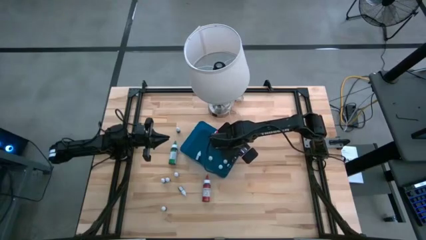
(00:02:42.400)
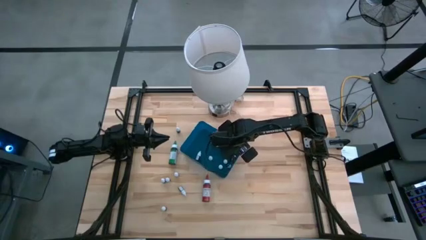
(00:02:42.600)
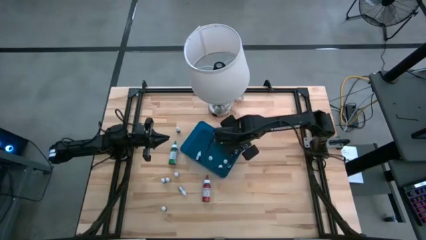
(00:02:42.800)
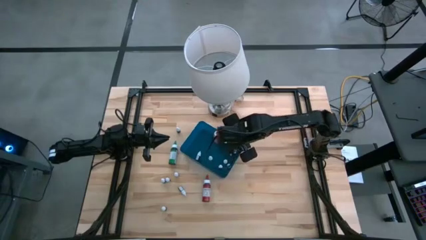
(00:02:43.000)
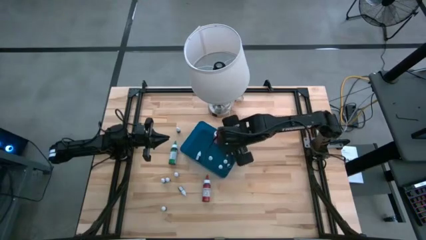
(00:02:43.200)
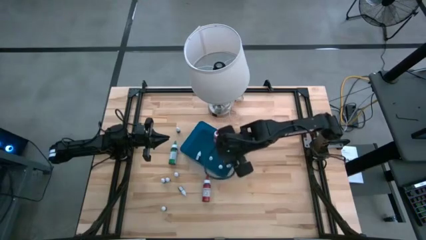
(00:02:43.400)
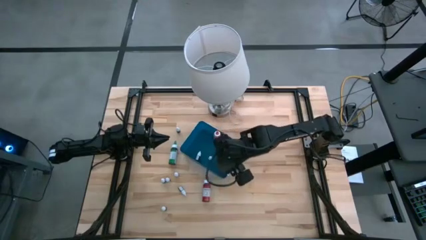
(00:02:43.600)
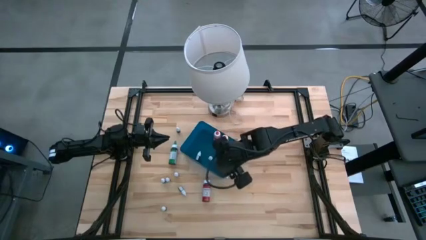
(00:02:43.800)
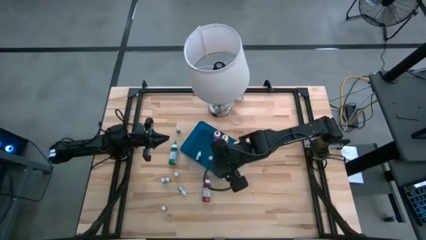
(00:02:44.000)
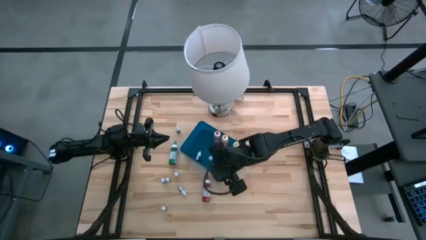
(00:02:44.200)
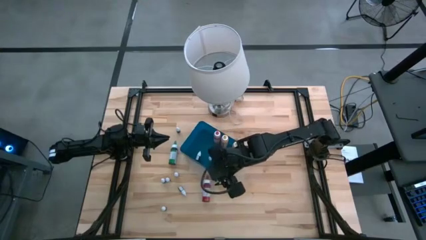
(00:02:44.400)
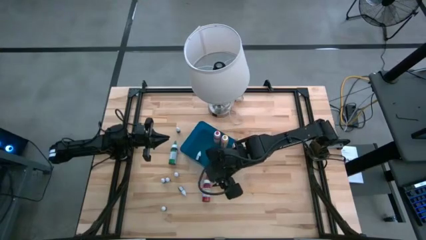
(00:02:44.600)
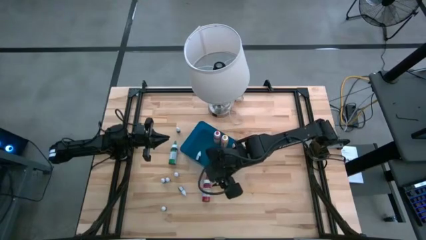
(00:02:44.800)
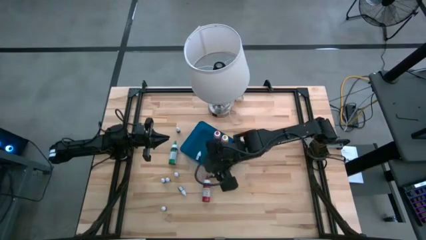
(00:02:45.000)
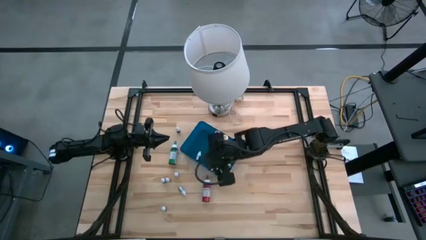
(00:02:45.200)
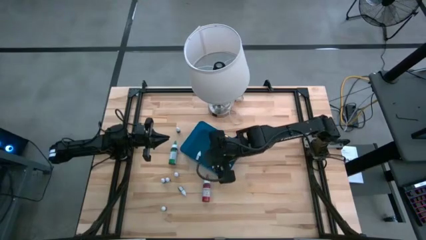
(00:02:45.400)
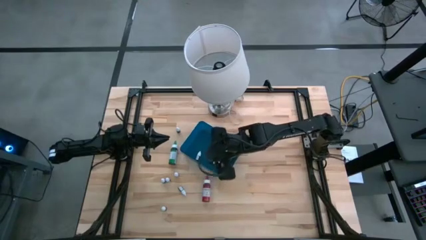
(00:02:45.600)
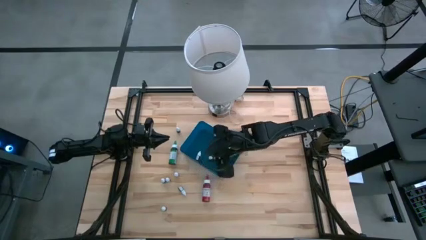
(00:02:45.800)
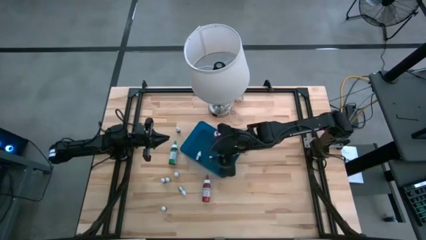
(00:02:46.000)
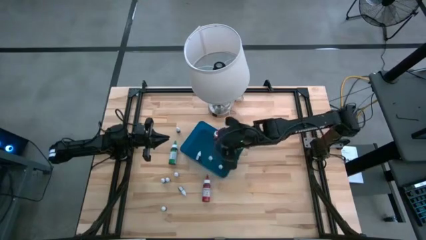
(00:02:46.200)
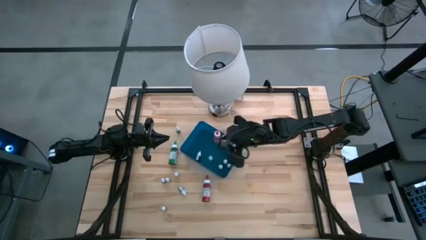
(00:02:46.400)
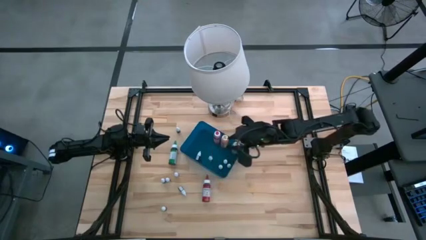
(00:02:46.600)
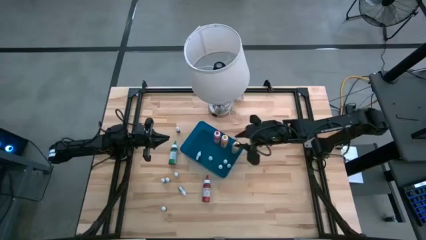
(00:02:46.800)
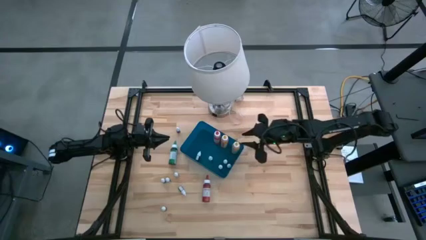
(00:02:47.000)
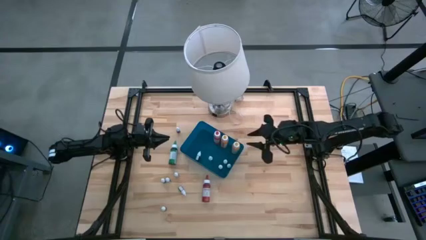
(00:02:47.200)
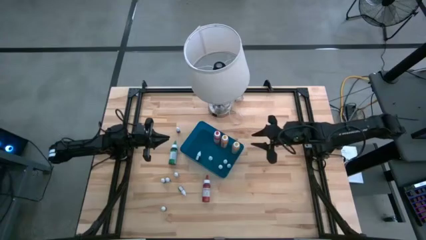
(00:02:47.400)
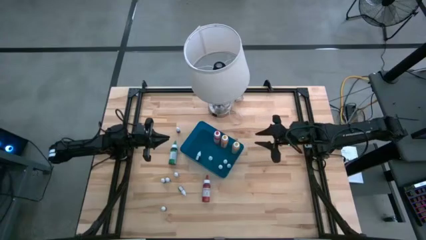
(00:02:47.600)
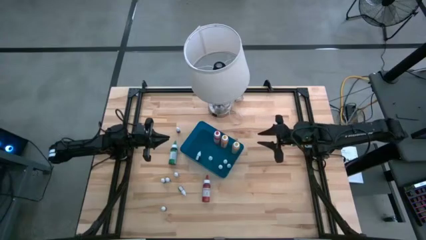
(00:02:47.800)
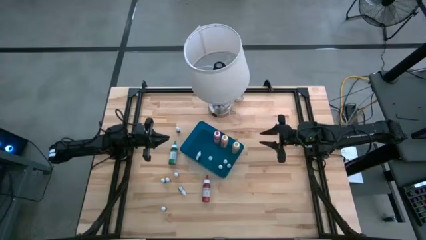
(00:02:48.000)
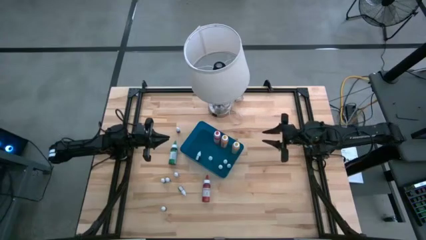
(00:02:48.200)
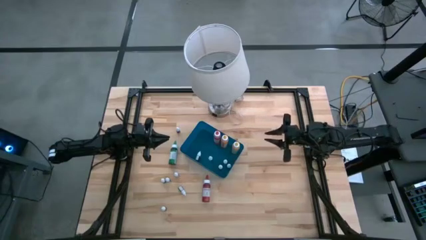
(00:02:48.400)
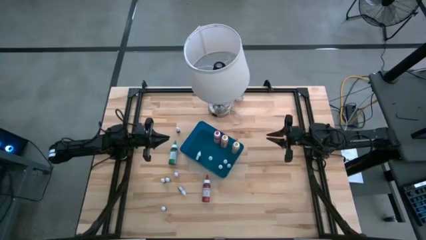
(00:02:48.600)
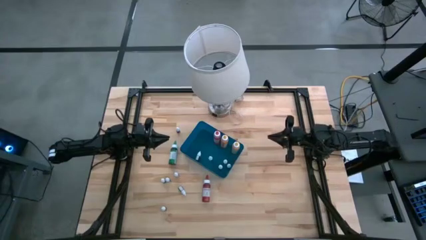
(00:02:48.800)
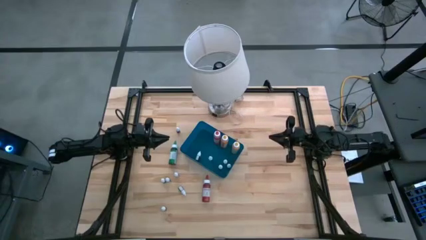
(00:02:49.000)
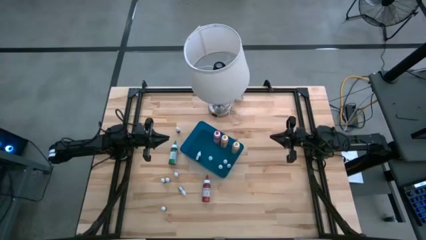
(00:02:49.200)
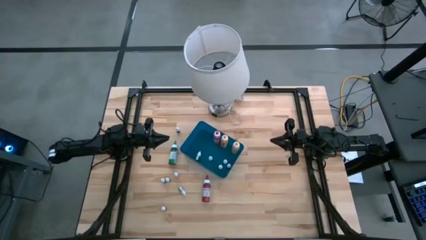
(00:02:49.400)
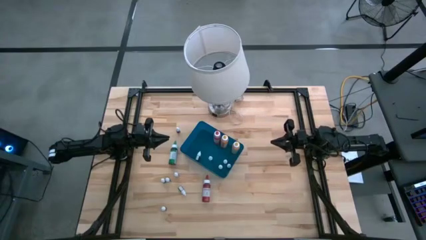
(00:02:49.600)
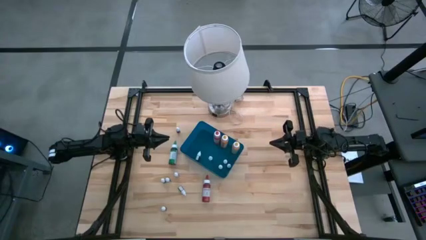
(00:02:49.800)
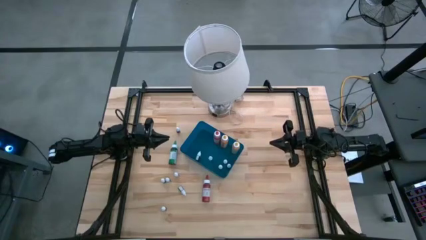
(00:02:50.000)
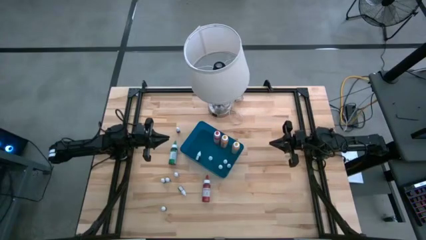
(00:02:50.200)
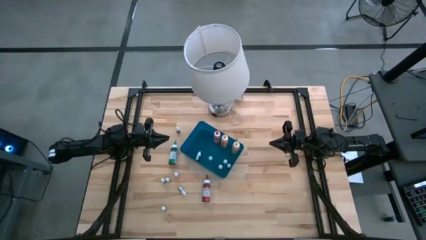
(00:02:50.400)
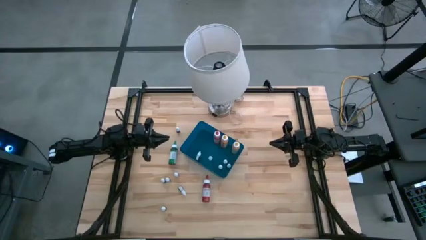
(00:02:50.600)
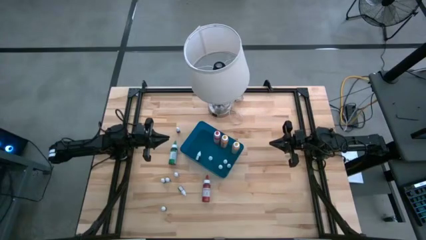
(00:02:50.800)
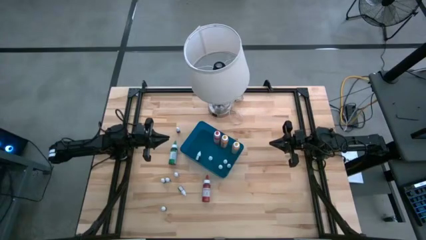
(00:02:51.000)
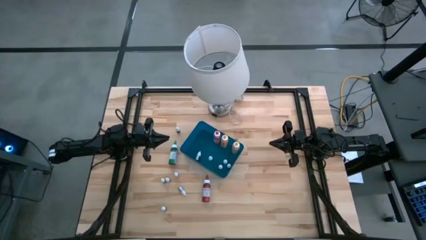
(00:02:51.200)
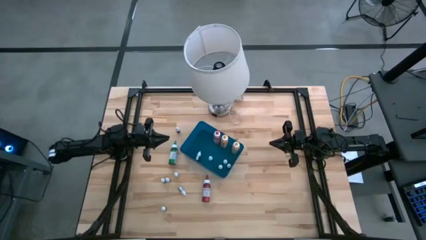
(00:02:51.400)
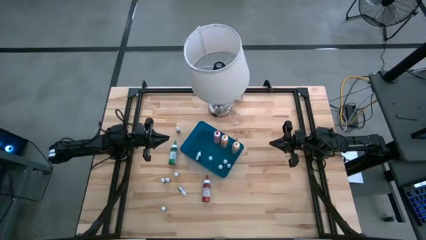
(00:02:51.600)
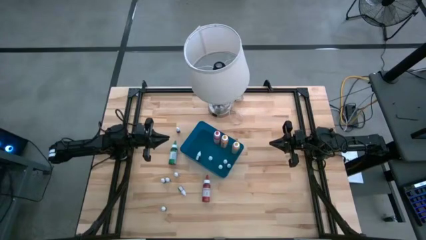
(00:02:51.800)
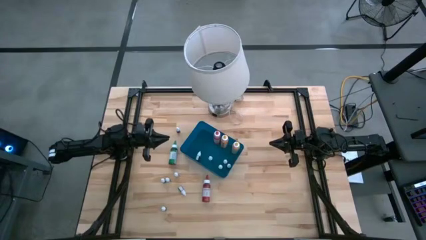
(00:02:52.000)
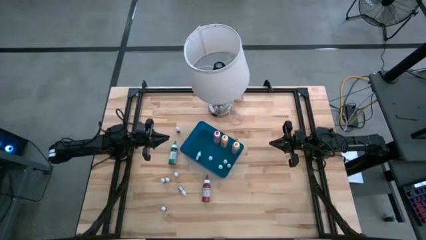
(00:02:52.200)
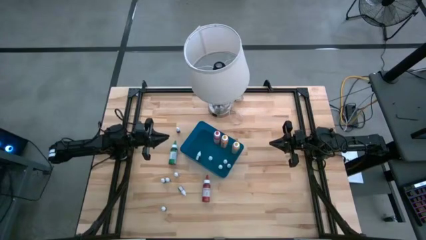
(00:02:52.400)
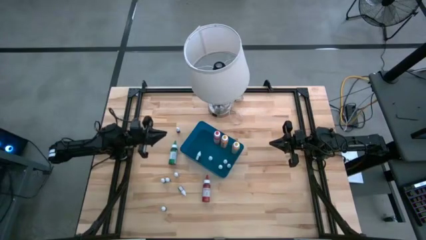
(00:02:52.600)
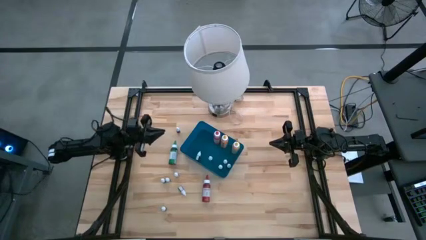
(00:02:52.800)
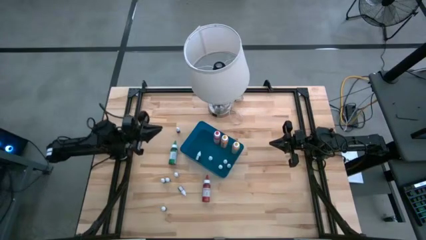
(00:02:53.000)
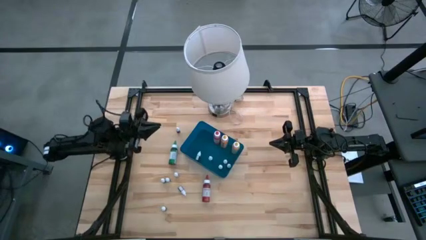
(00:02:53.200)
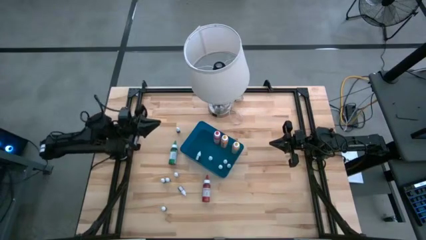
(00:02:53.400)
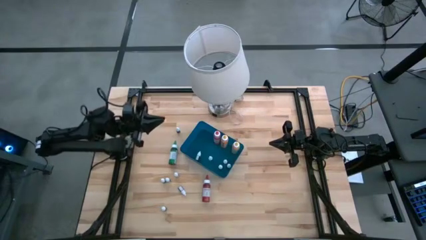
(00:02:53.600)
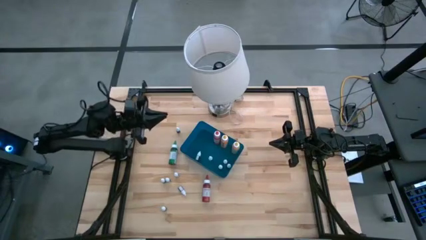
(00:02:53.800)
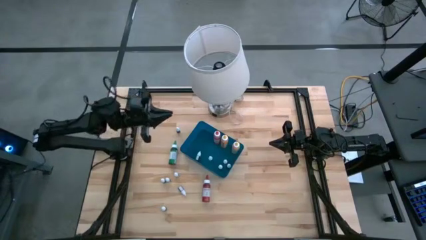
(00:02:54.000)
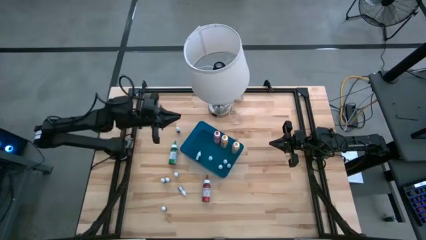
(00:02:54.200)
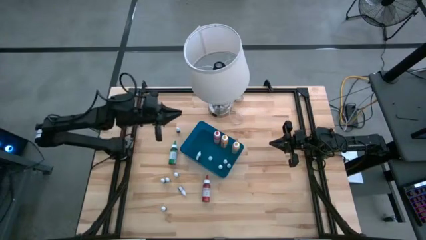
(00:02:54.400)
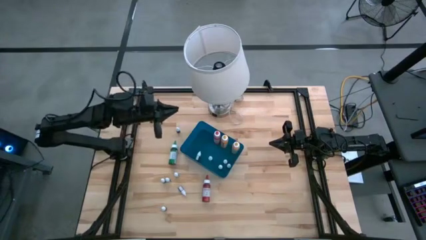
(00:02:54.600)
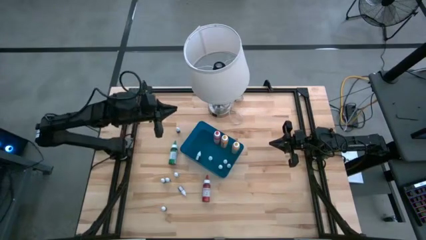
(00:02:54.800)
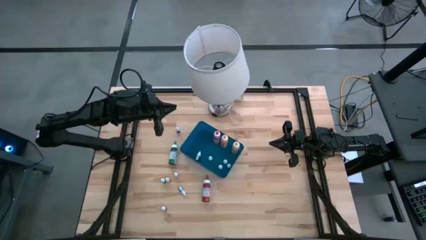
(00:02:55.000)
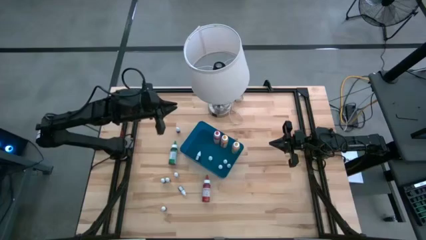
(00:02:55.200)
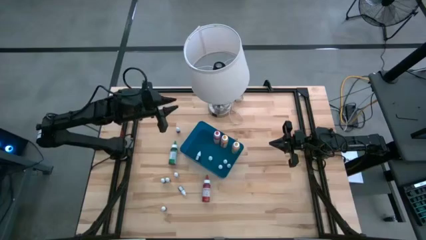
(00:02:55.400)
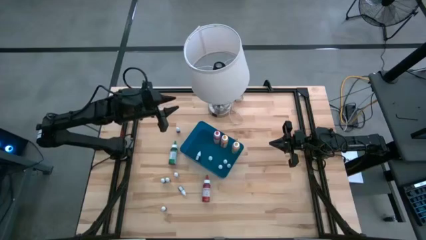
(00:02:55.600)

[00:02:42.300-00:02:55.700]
Task: Pick & Place food coloring
Put the small black food coloring bottle into the blue container
